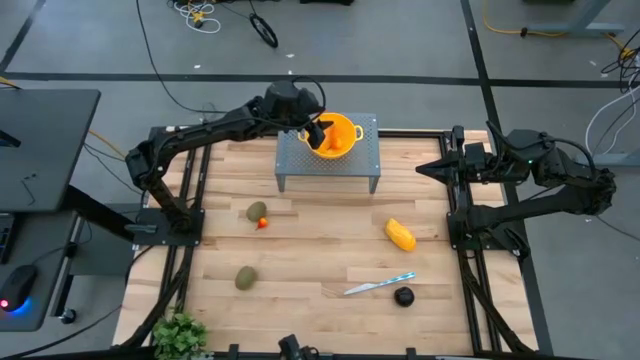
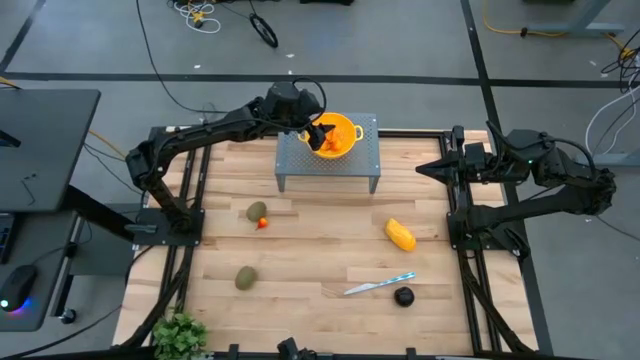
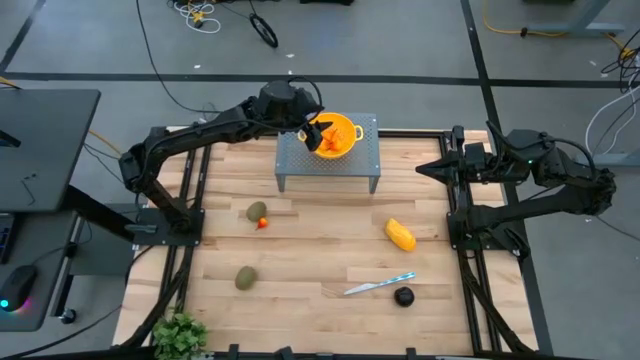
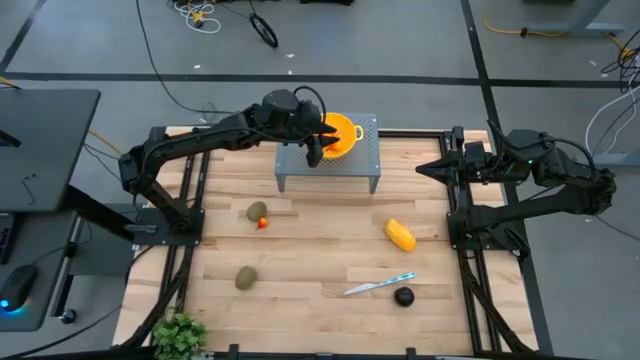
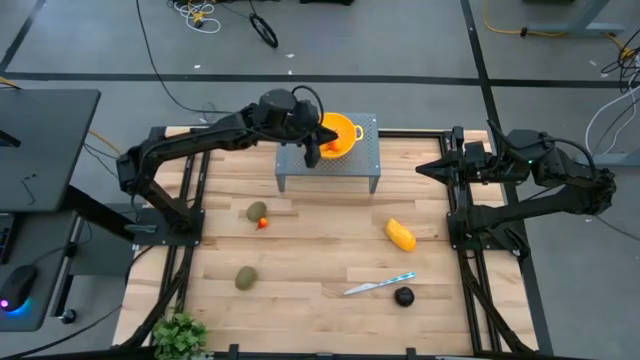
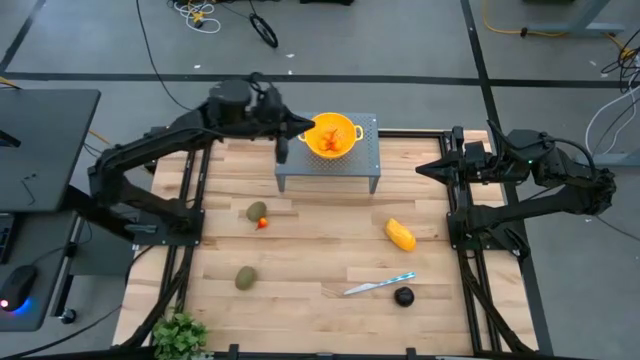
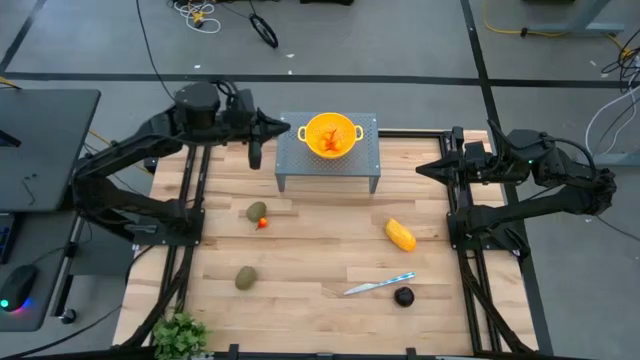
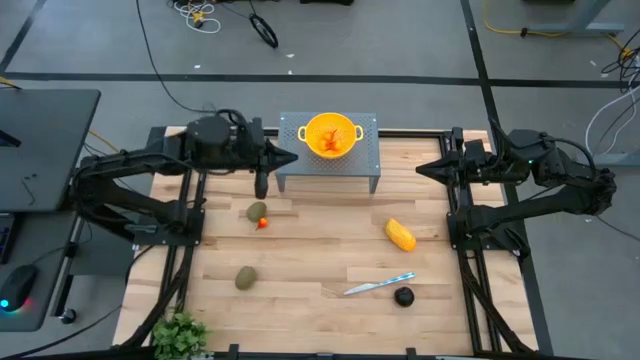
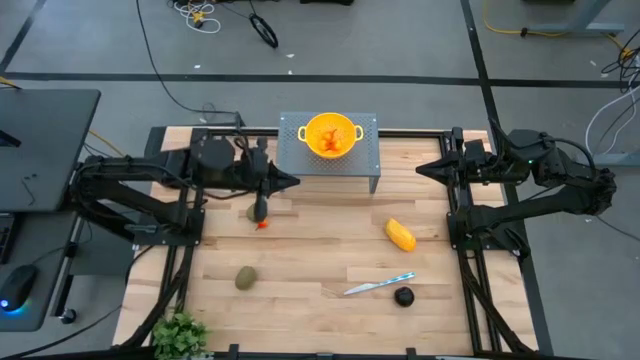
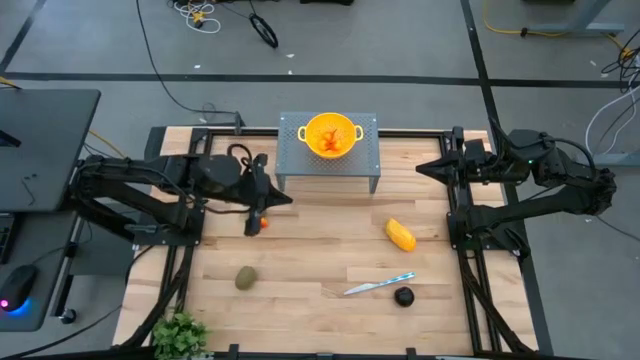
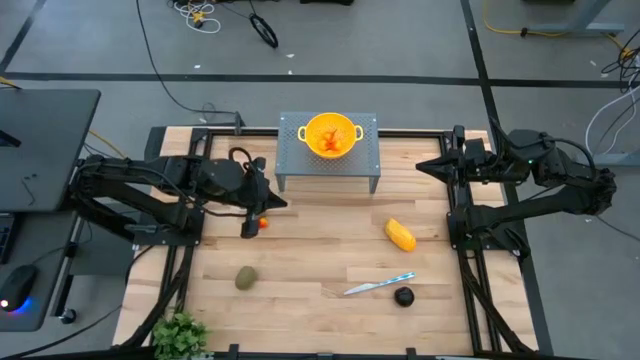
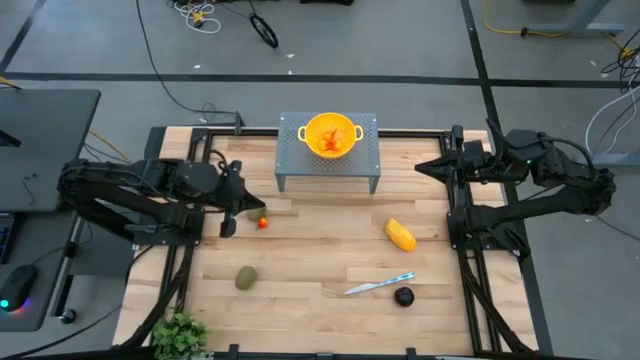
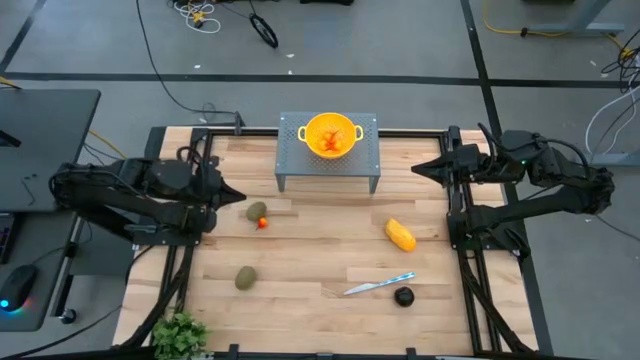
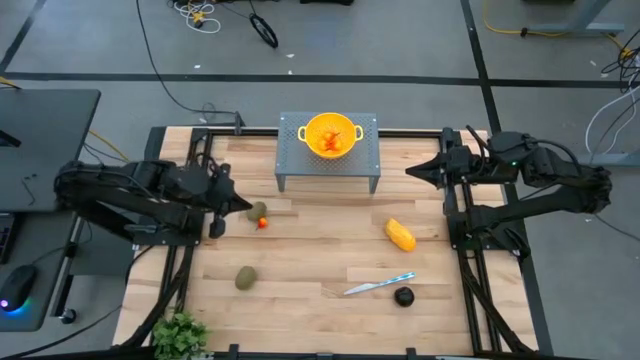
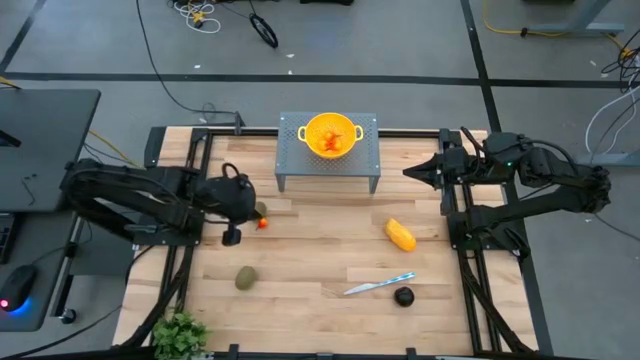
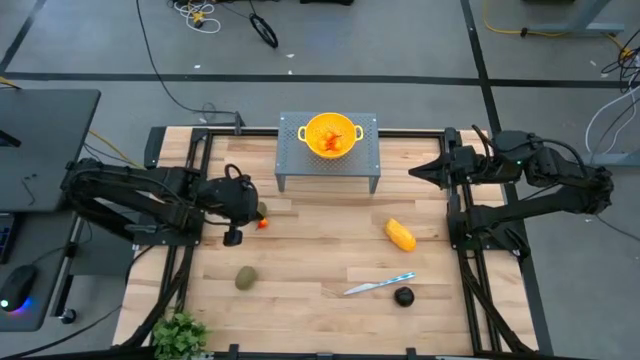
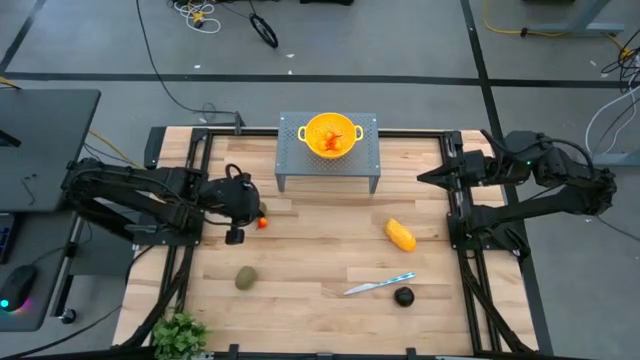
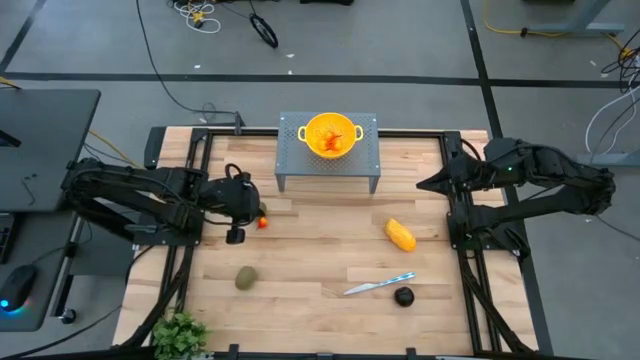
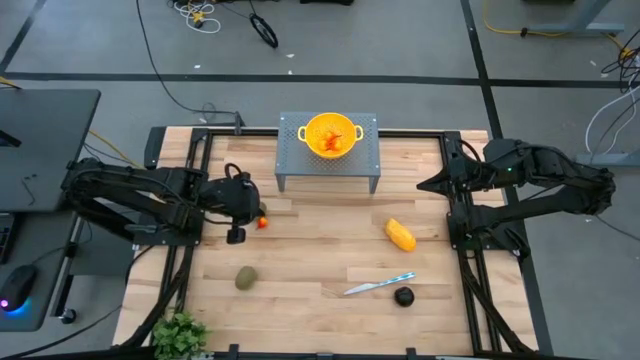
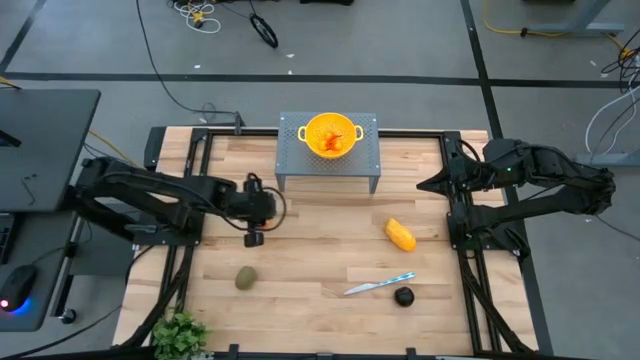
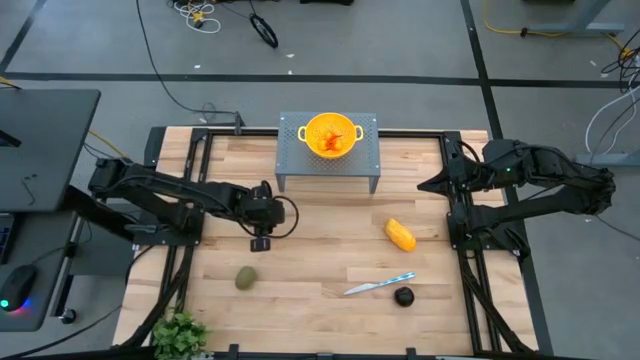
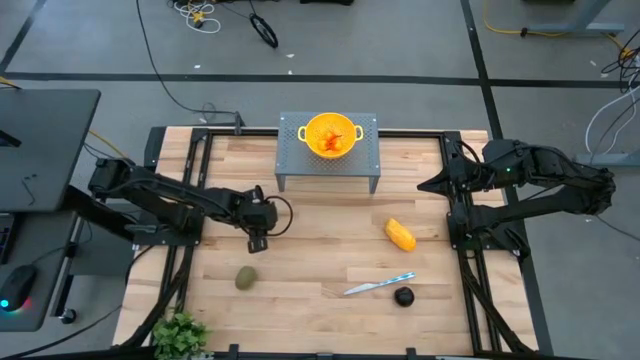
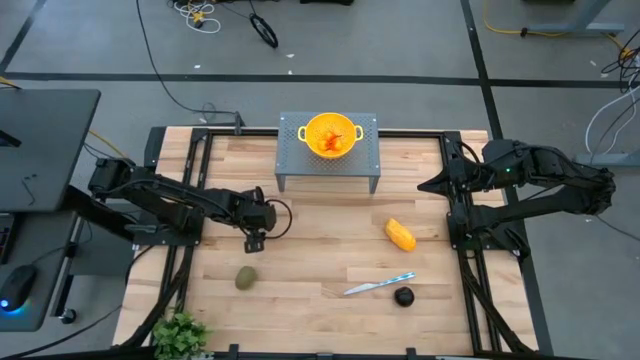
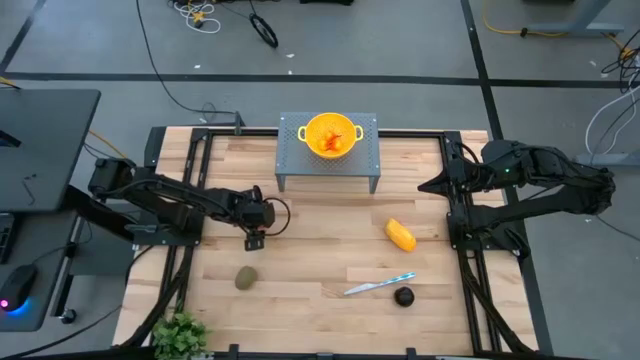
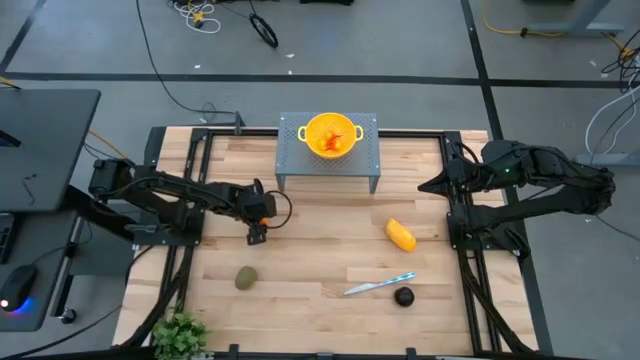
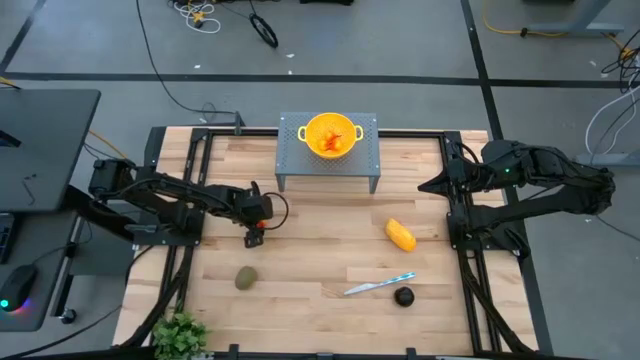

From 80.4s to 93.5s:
Task: Pick & Place Fruit
Put the yellow pear into the yellow strainer bowl on the shelf

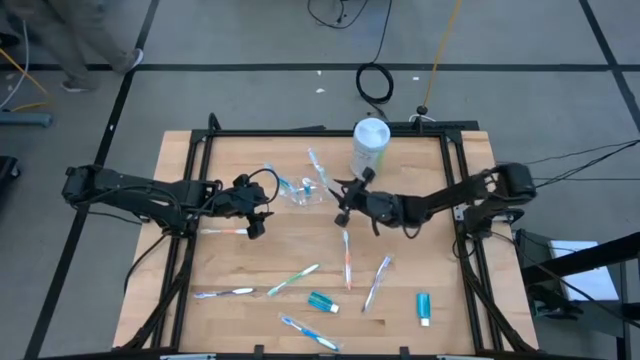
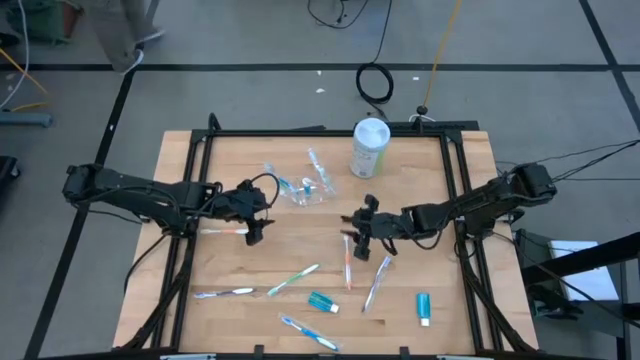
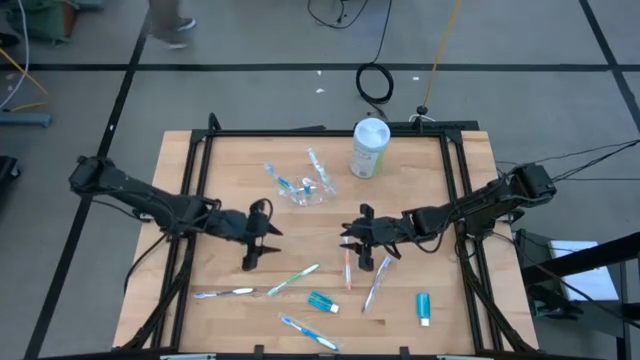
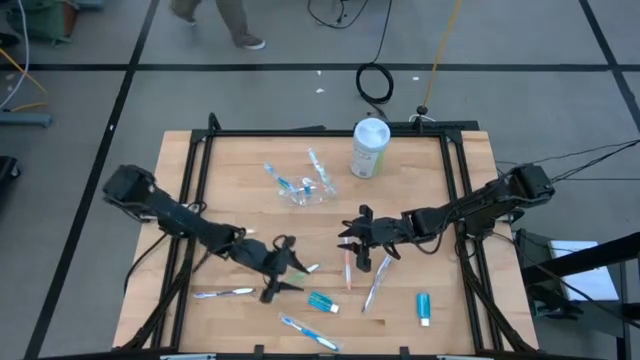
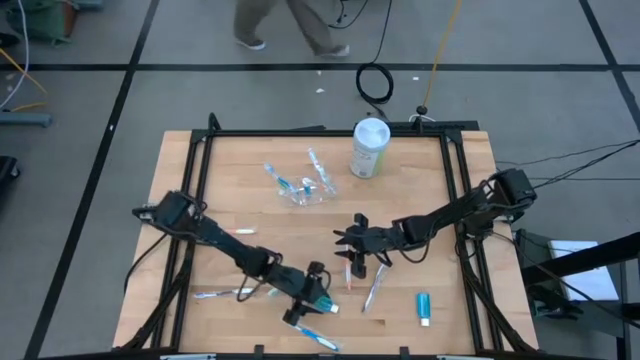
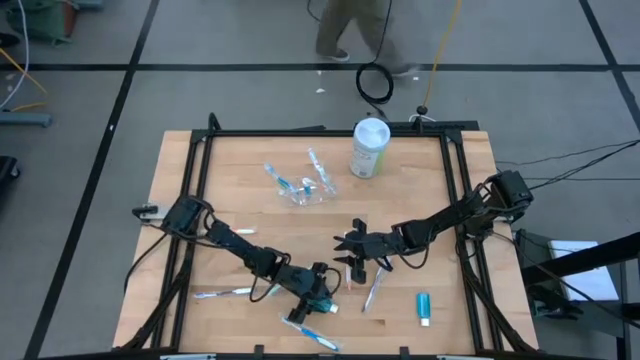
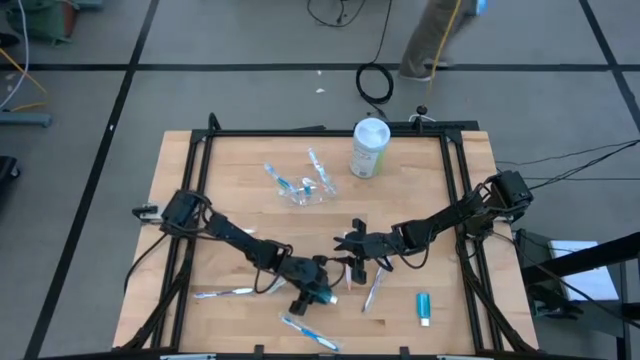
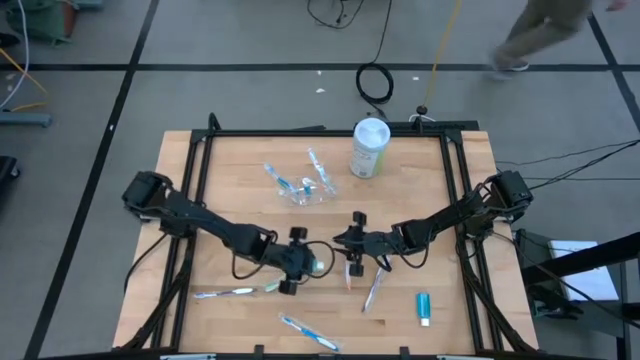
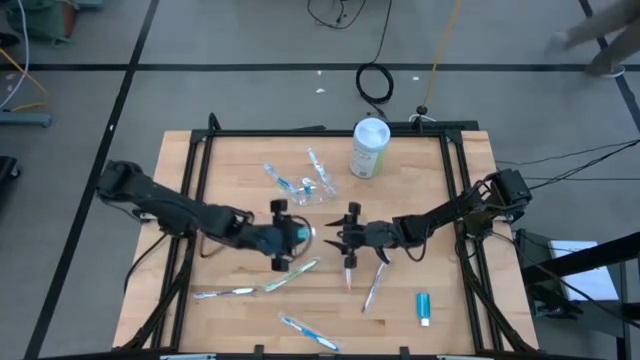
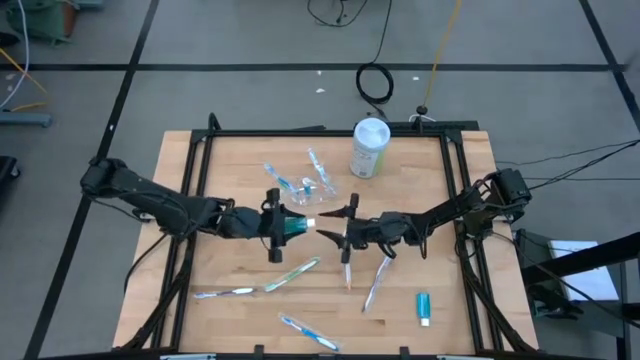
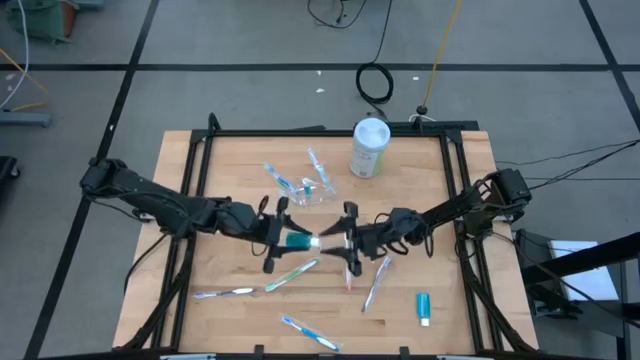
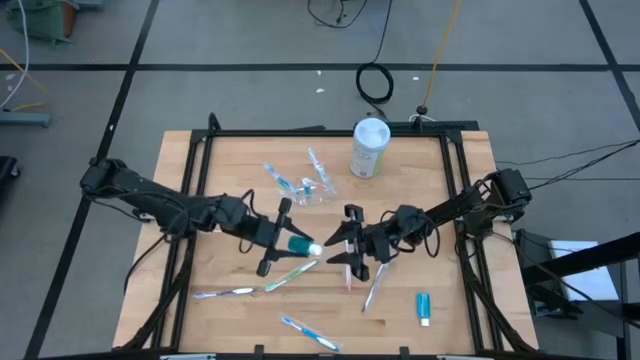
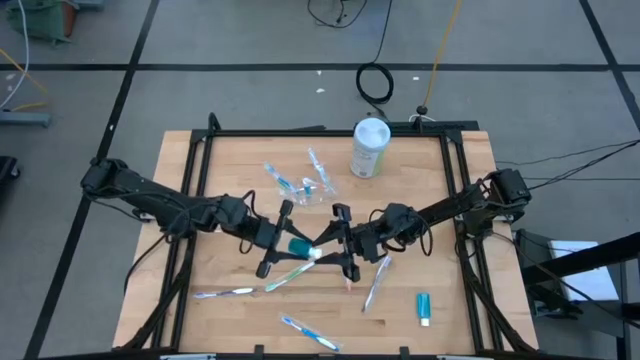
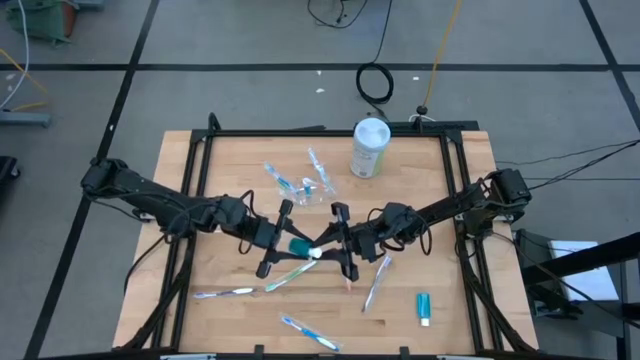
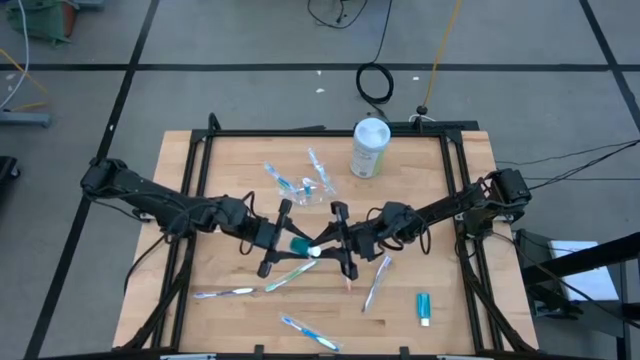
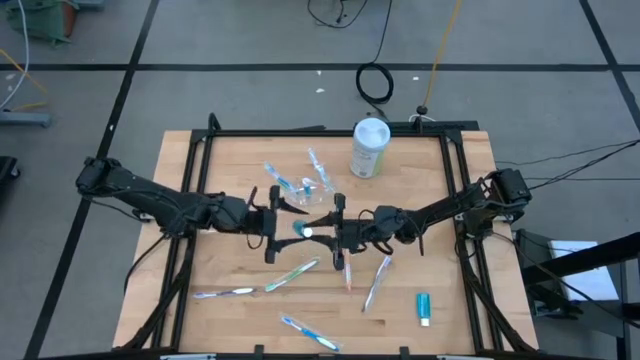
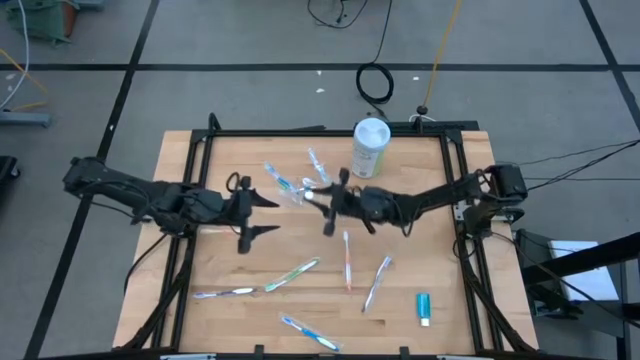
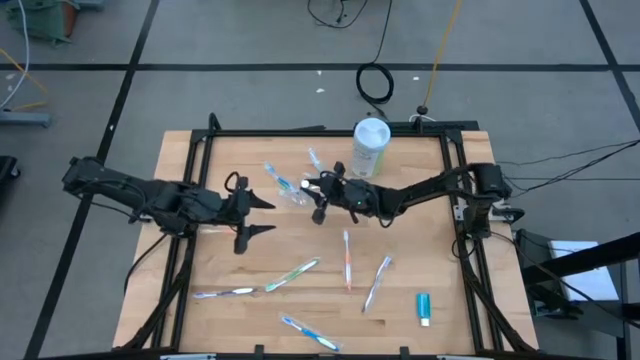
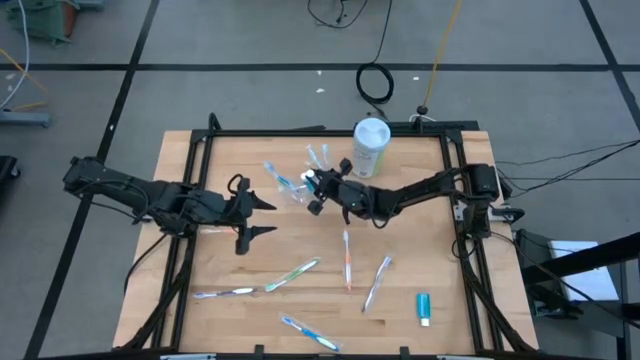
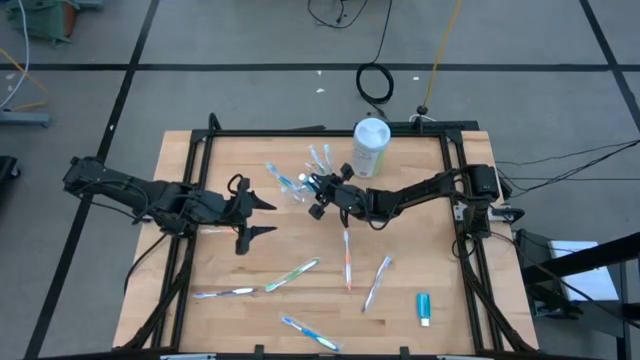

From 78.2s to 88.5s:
Task: Pick & Place toothbrushing station
Put the blue mouthwash into the transparent organizer
